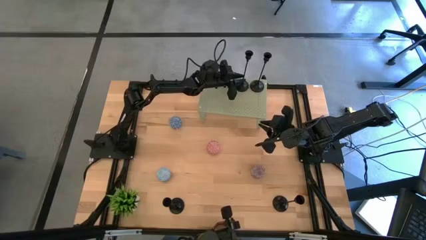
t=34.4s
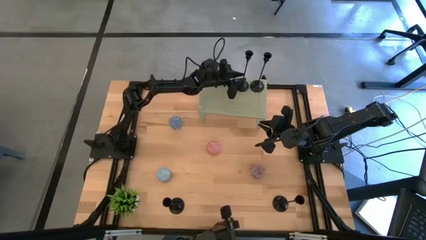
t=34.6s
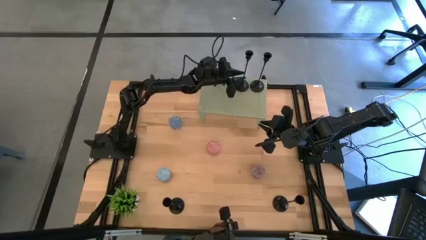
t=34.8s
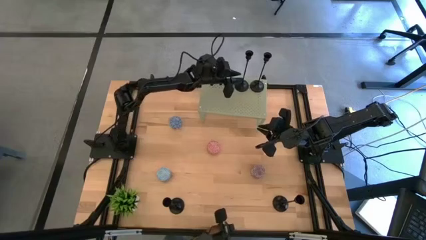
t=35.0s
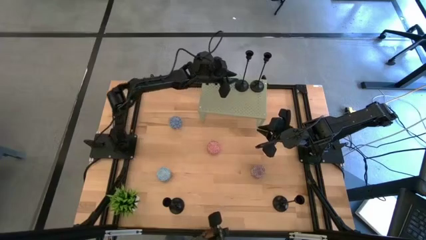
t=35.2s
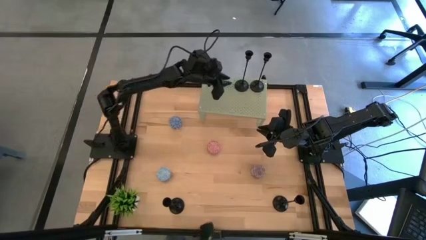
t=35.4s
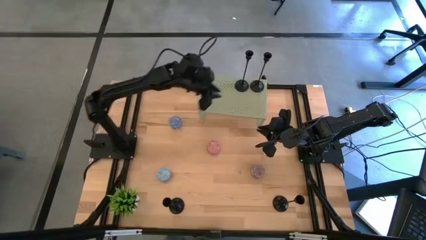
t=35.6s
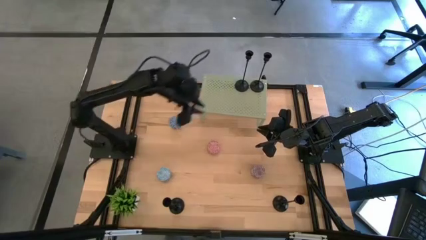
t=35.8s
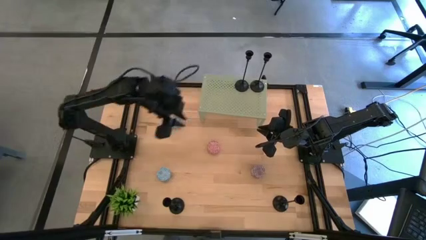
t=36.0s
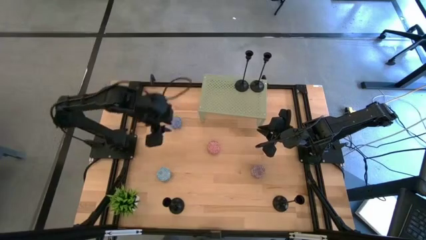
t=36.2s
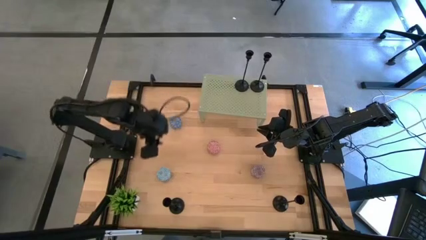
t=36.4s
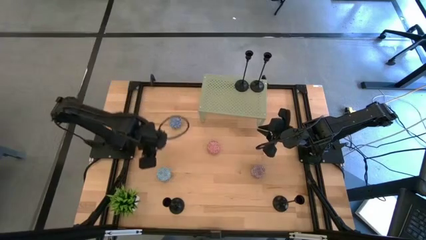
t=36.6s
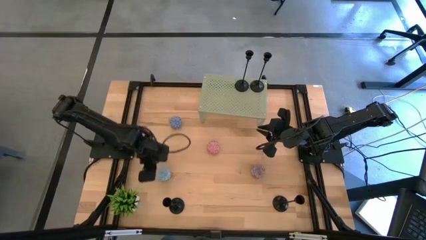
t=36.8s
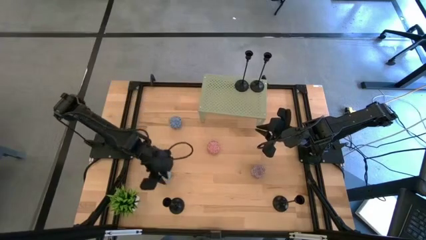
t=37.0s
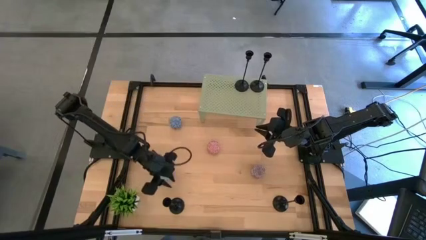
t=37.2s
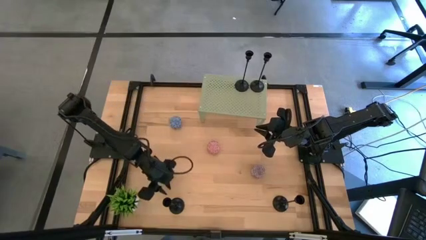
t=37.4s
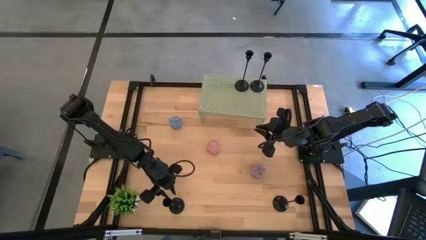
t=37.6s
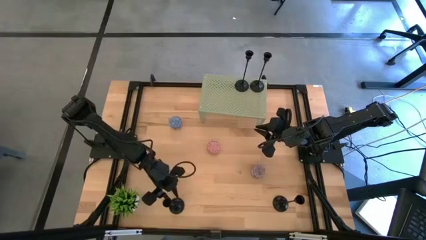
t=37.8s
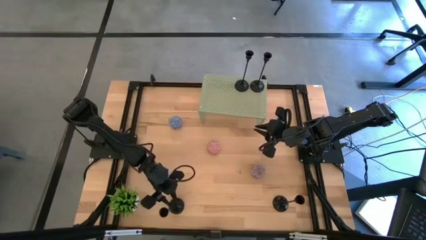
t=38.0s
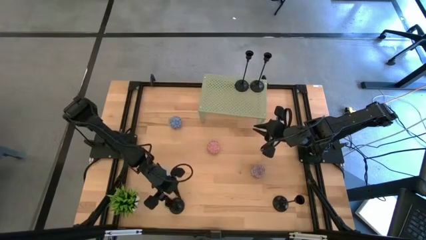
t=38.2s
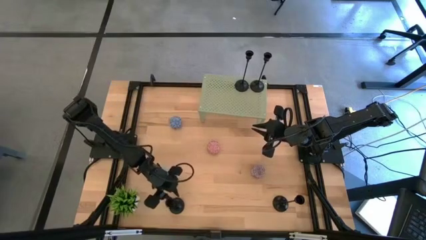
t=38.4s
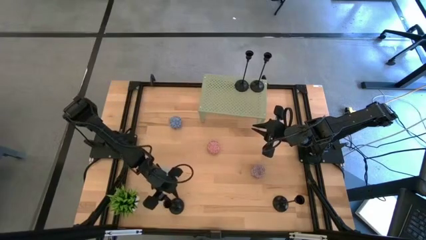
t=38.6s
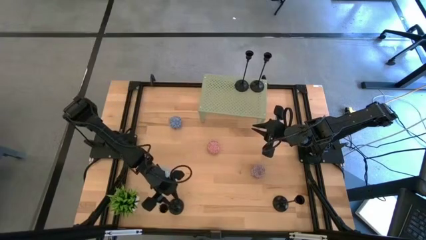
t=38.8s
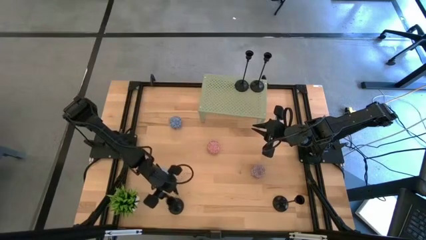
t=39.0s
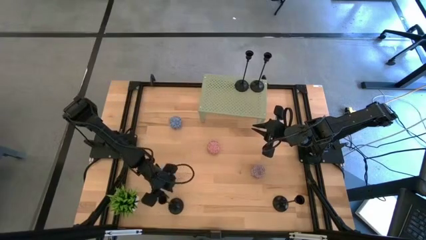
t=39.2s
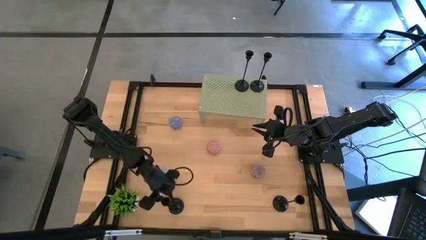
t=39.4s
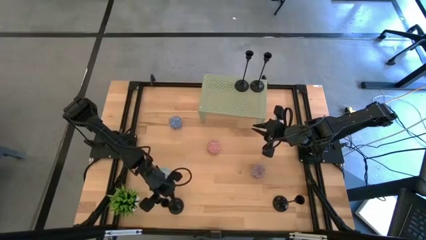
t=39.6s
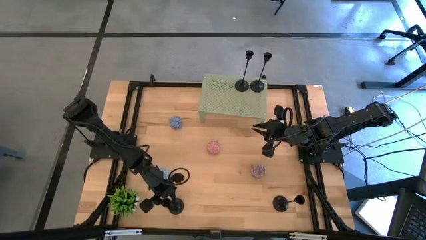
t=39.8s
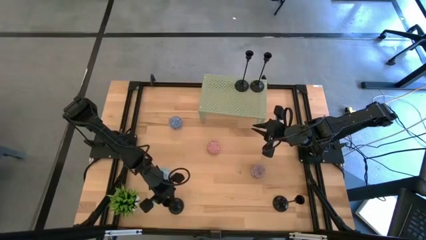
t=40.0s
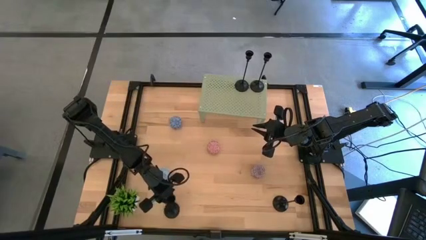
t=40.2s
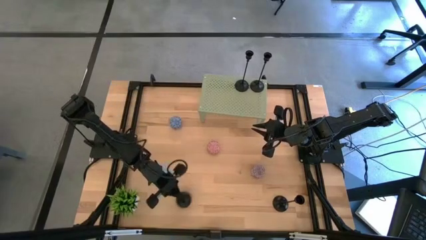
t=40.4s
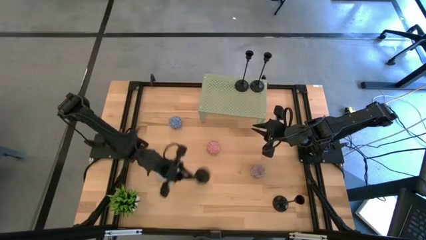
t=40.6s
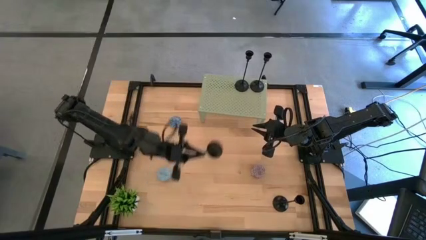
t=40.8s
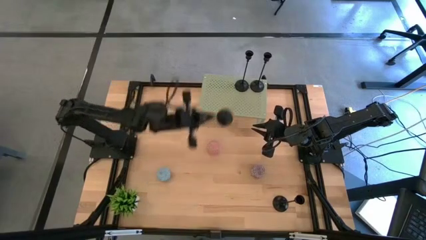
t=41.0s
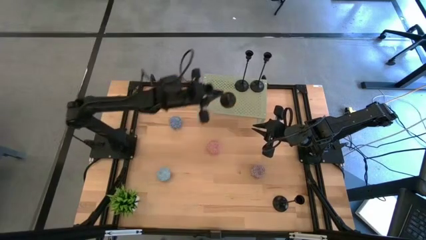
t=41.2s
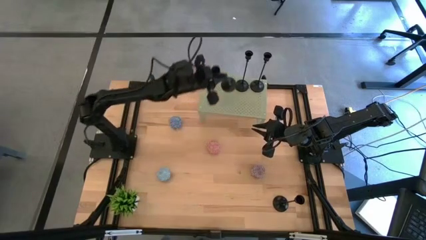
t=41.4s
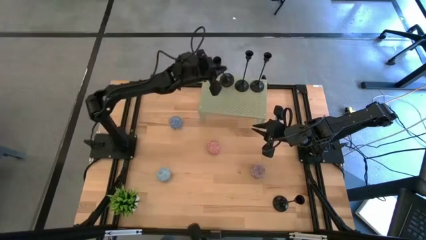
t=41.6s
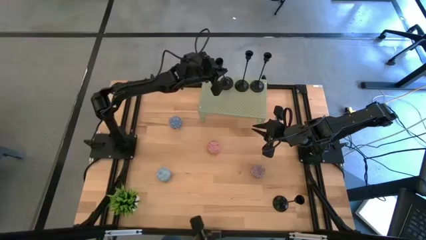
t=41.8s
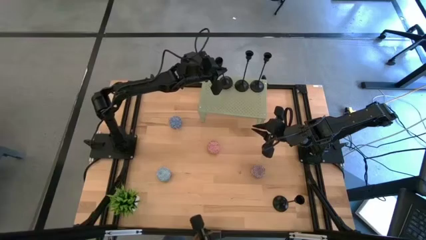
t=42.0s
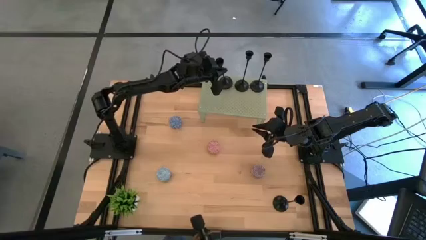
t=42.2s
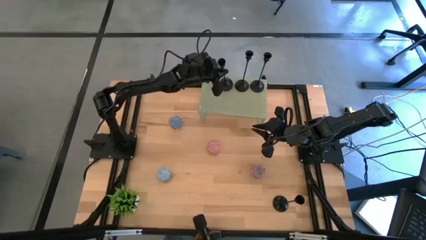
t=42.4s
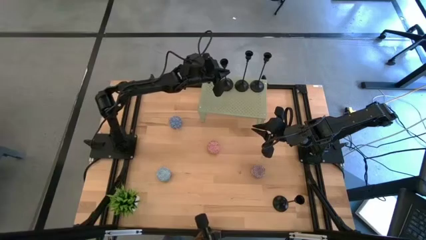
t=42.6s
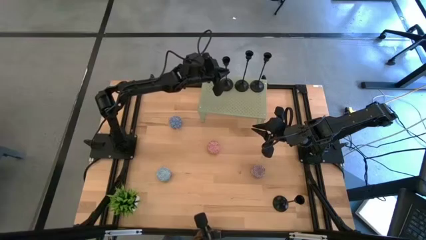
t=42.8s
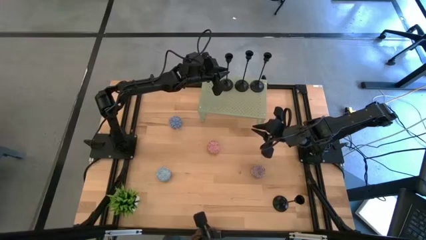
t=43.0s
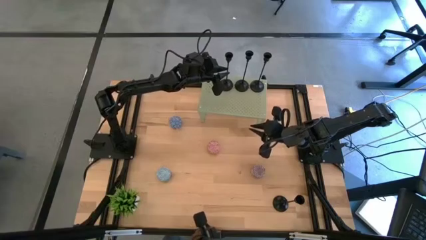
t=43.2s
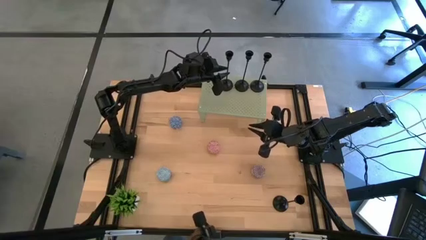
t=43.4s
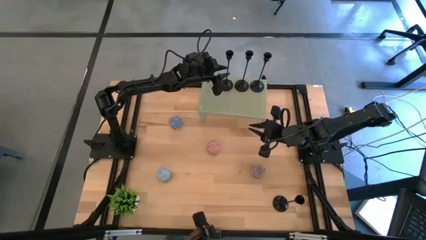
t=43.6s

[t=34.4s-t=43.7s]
Task: Pick & Place candle stick holders
Put the left black candle holder on the shelf

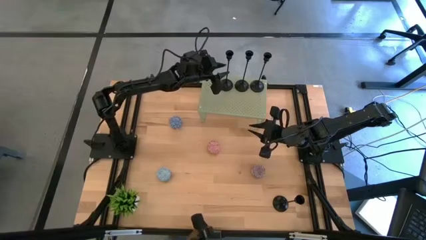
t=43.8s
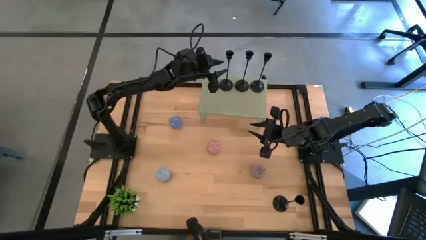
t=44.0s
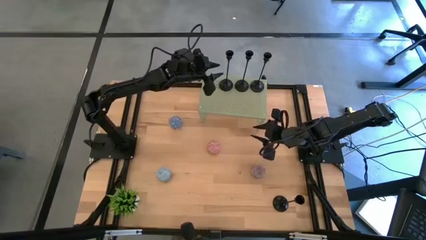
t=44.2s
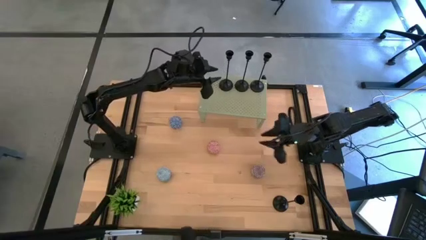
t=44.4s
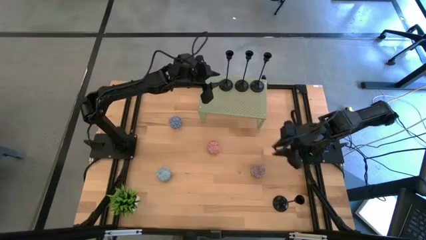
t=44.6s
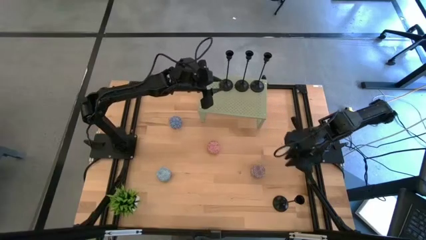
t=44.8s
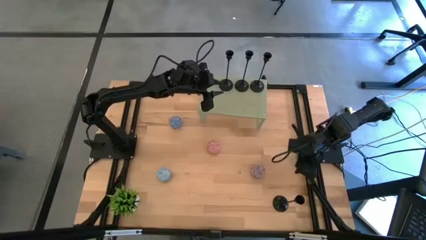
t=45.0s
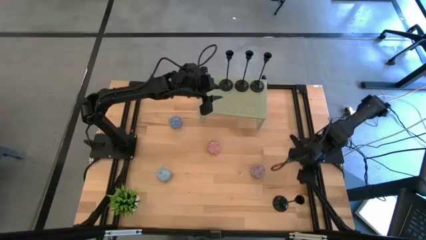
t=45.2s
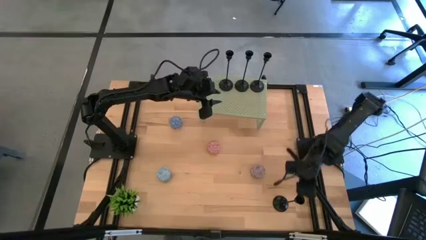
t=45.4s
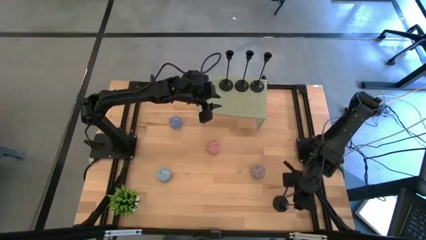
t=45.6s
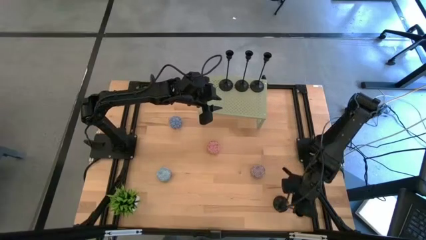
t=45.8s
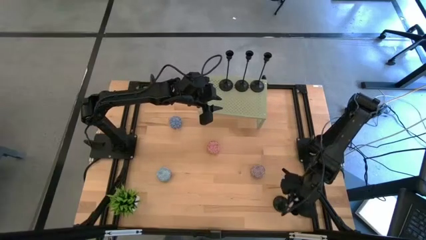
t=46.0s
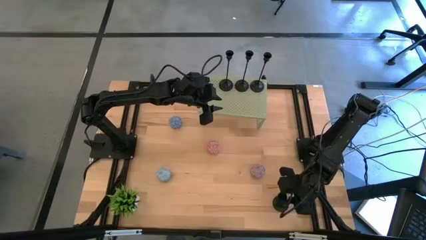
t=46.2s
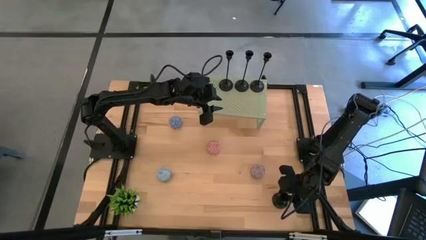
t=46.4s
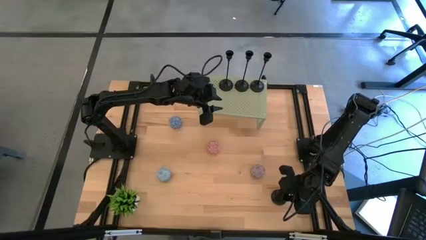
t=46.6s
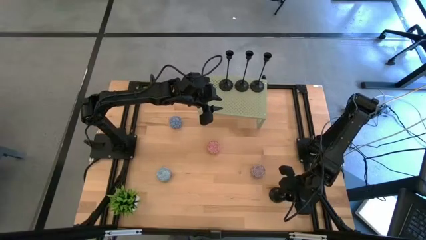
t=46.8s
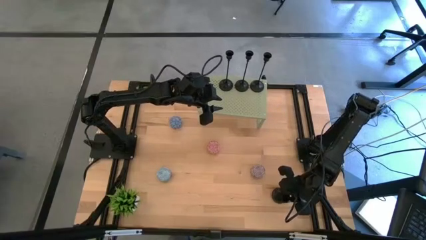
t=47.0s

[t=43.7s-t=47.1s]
Put the black candle holder on the shelf

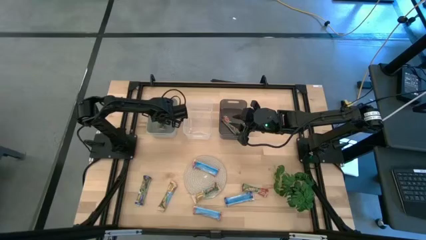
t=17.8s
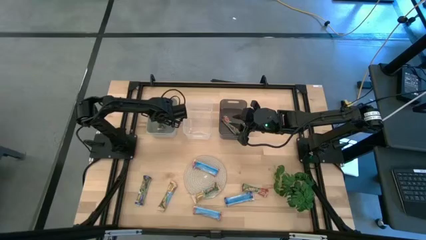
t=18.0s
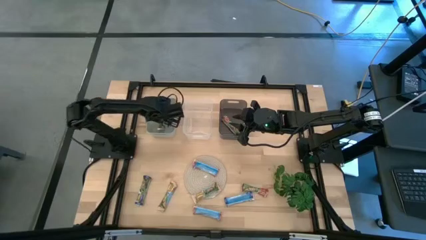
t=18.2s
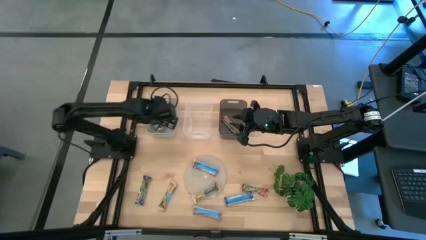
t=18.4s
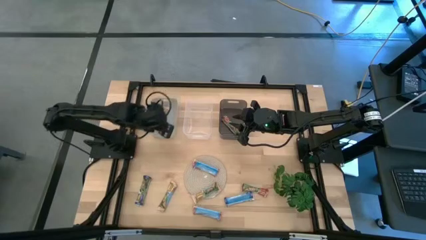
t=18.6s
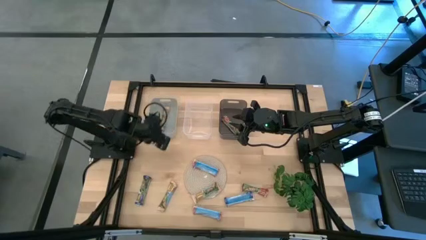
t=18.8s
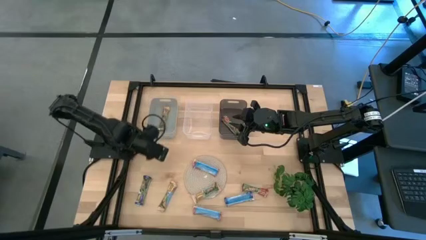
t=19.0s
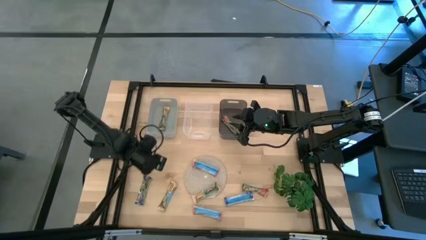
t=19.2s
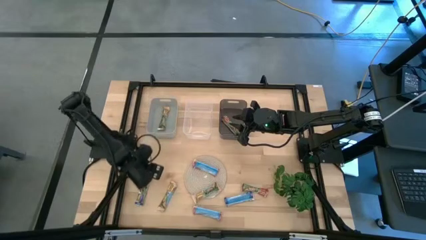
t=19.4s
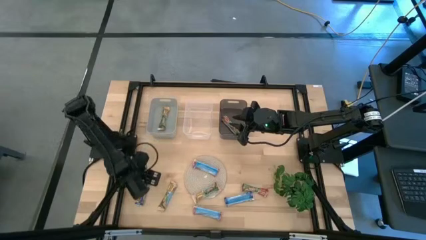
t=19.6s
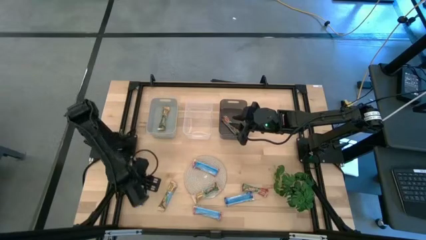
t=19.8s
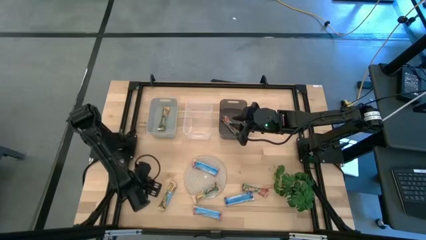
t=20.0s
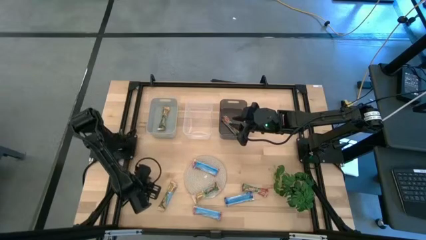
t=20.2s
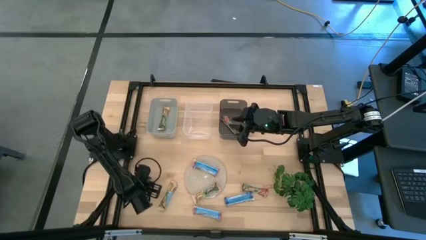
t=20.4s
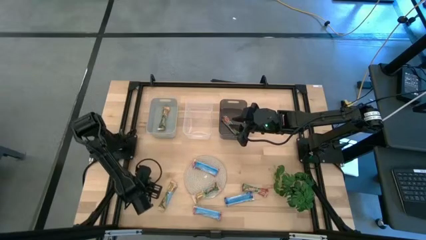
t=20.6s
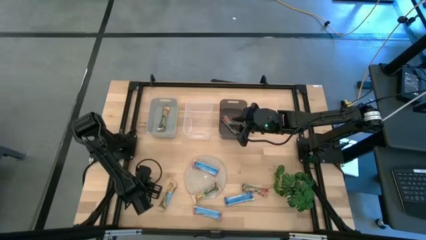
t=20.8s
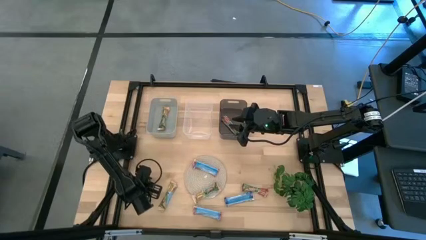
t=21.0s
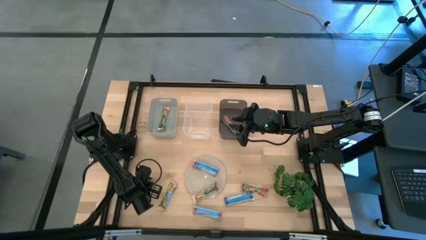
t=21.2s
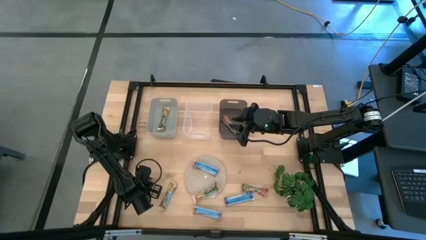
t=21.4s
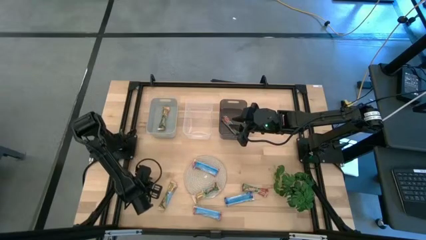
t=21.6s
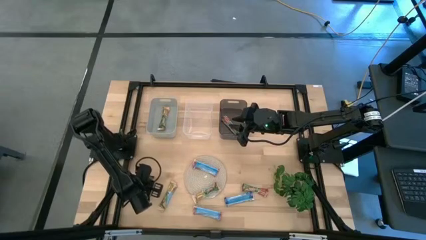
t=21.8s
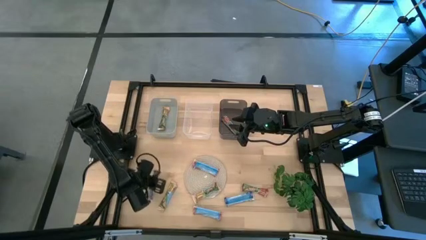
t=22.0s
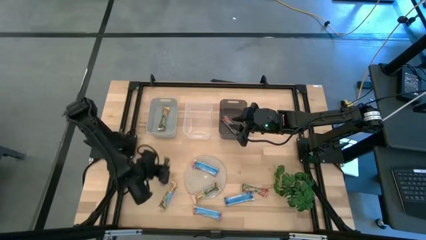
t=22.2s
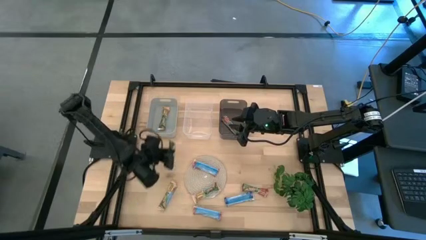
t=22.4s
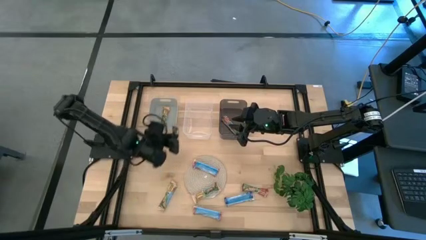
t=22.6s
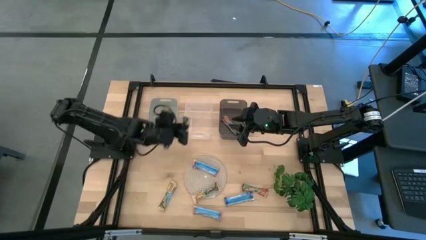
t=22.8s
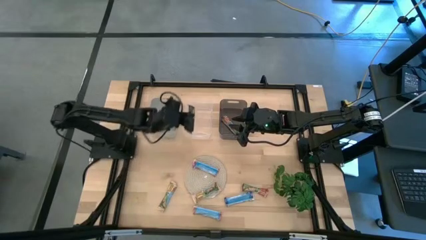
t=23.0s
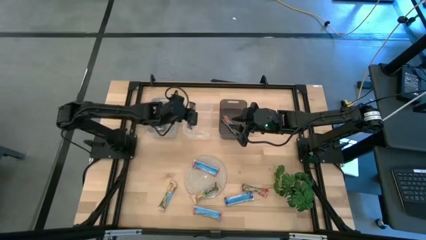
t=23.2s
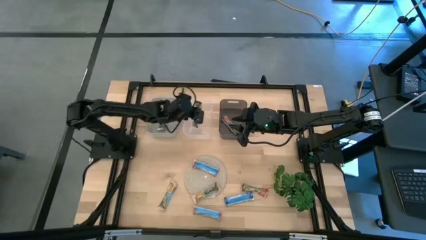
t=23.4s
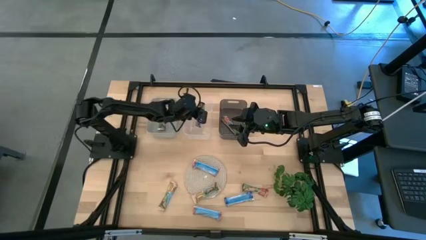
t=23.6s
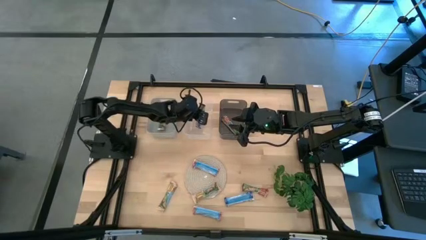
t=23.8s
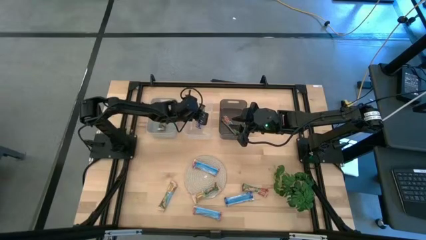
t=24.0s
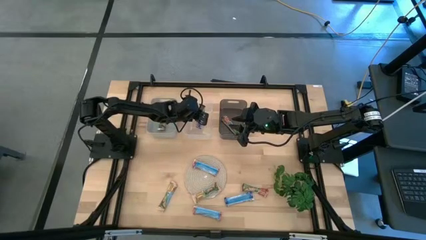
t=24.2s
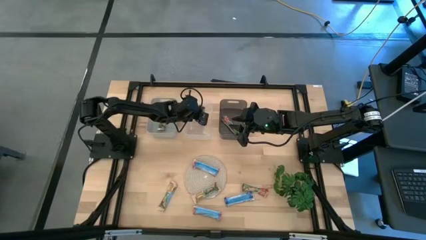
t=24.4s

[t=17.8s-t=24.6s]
Task: Pick and place Granola Bars by type
Put the blue granola bar into the transparent bin
